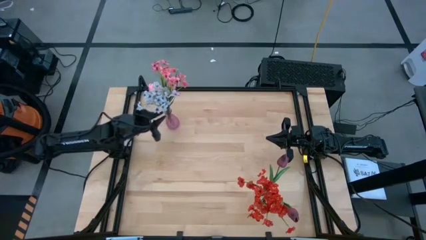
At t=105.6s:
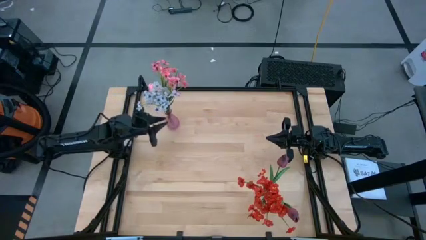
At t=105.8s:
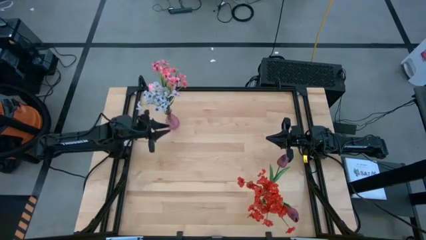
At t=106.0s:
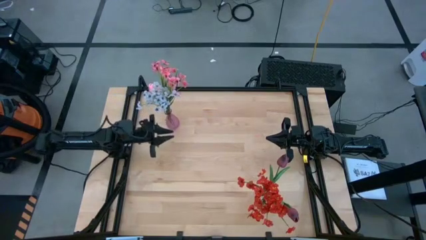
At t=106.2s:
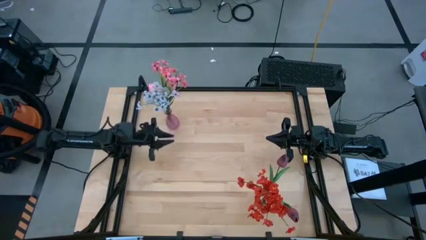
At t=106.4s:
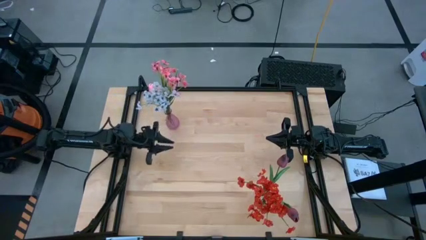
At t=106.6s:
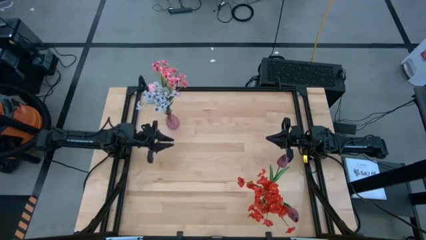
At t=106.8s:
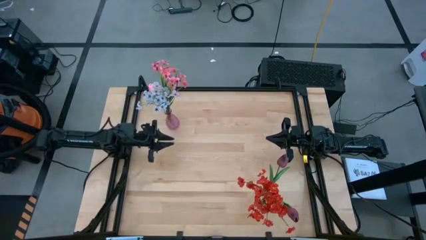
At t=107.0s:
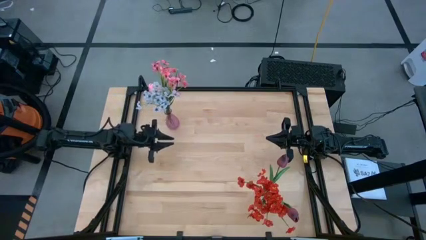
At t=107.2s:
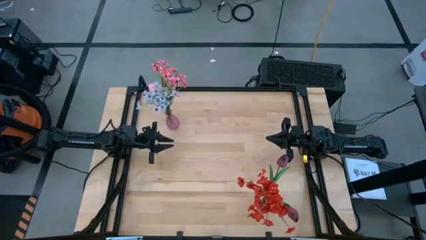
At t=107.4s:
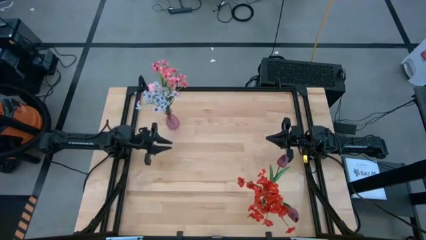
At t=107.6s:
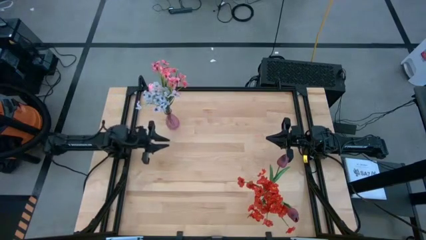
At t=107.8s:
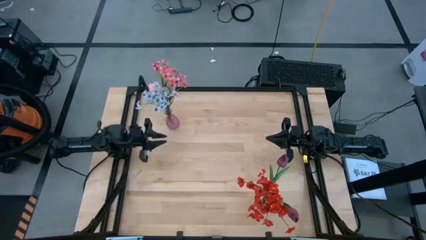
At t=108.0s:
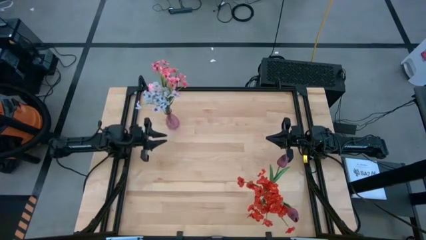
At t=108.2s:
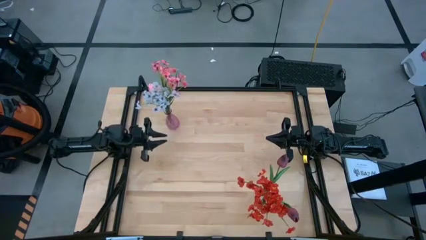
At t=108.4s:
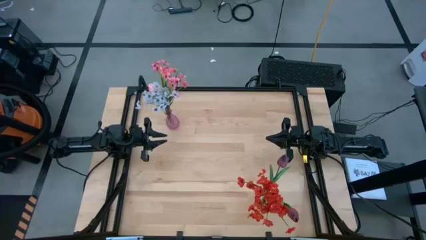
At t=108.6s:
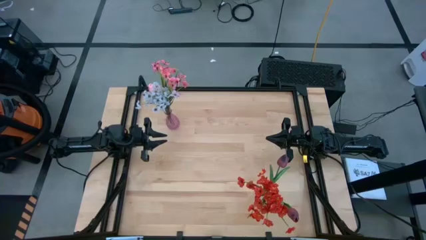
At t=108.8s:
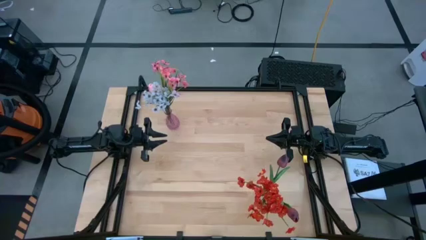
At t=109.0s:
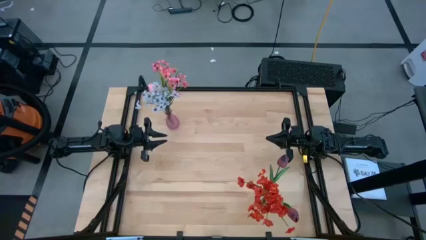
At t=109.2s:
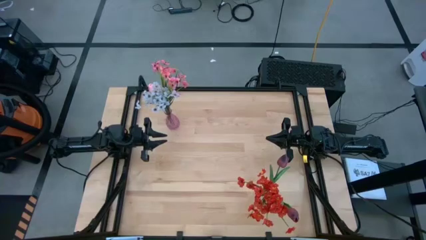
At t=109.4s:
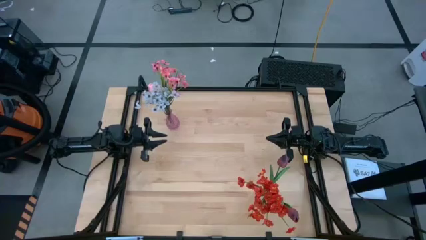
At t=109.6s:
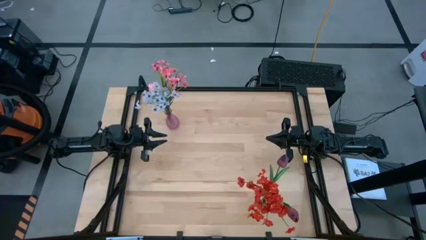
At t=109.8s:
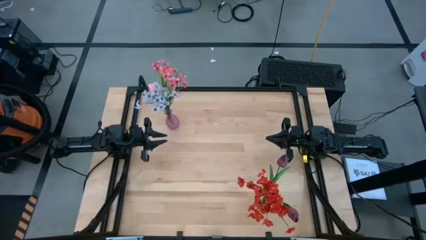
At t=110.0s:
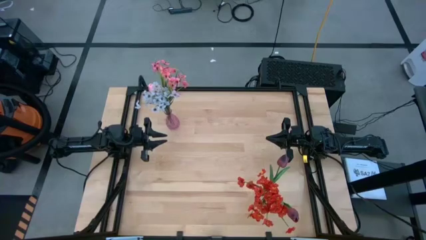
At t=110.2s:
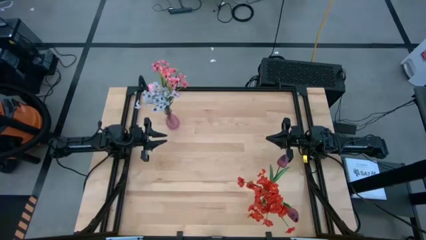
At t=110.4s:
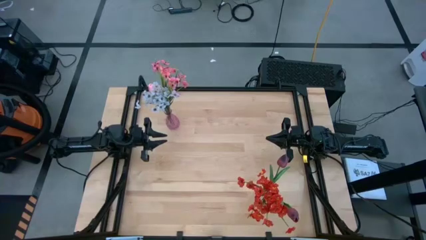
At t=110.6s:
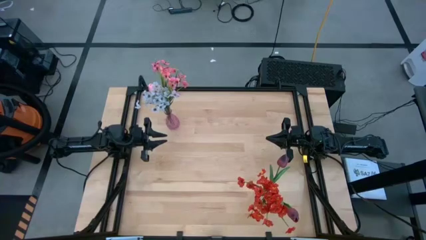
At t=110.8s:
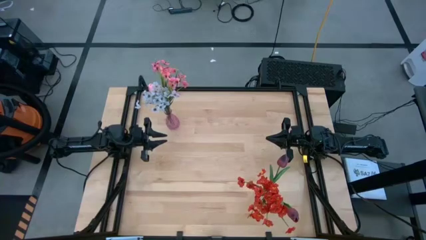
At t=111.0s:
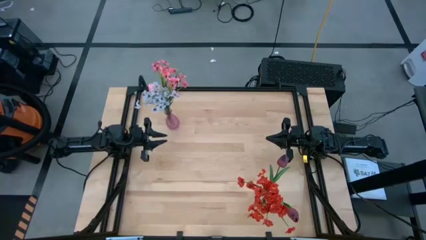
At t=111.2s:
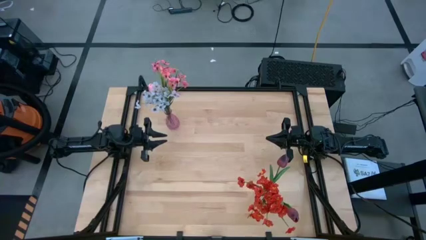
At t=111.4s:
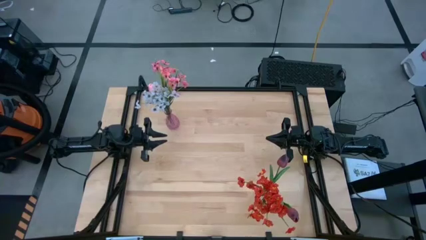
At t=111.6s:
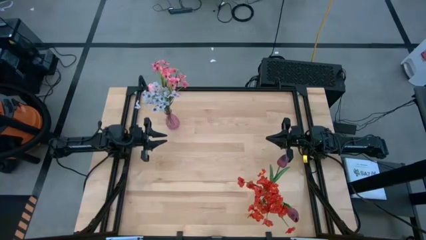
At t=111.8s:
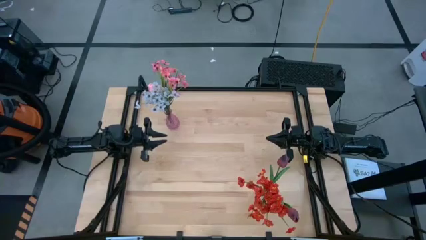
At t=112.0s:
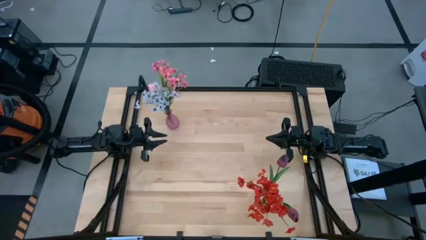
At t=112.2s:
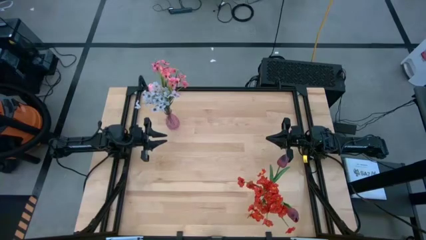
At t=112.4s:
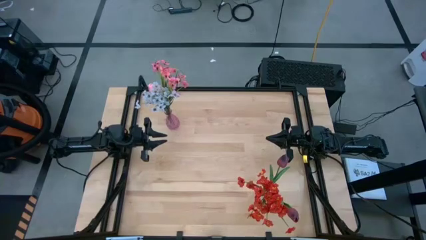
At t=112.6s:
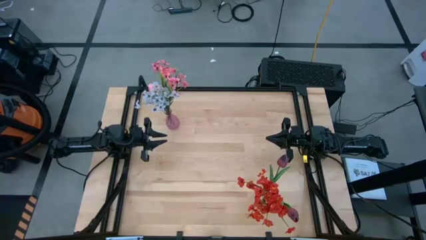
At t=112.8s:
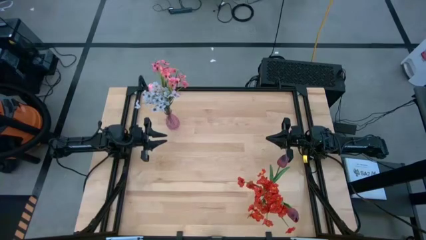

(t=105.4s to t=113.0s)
Task: Sort flowers into vase by color
Return to Home Position

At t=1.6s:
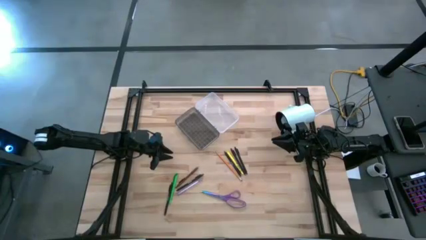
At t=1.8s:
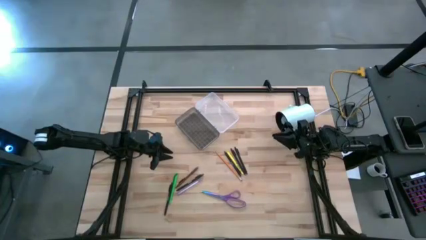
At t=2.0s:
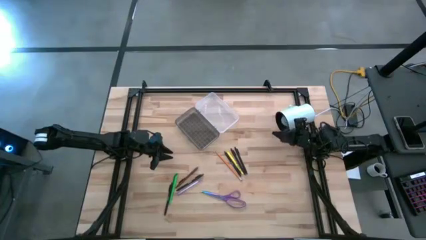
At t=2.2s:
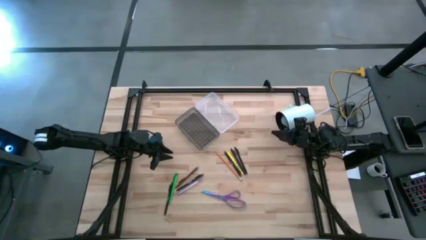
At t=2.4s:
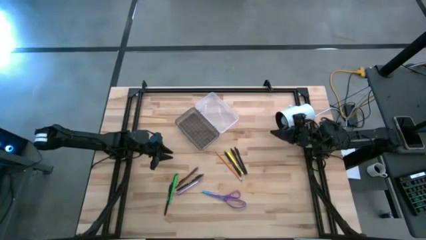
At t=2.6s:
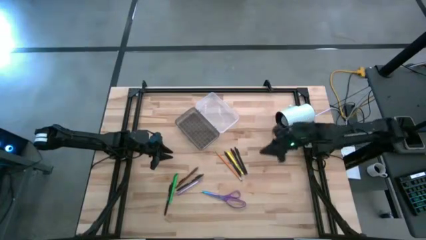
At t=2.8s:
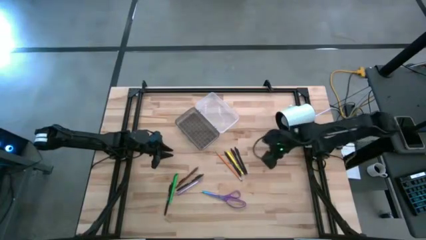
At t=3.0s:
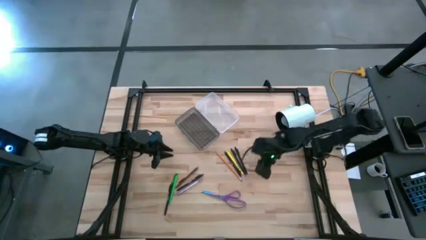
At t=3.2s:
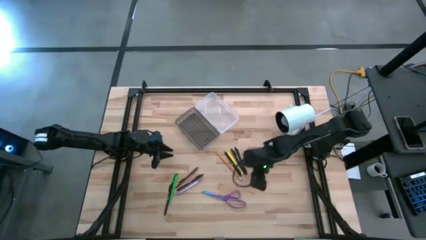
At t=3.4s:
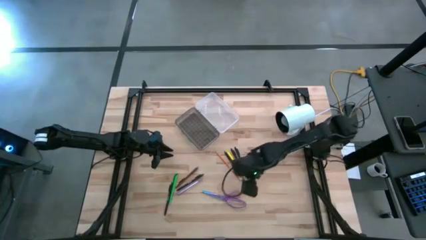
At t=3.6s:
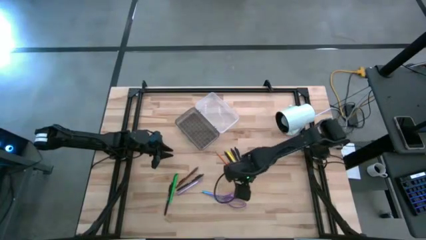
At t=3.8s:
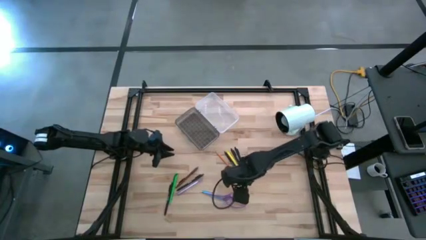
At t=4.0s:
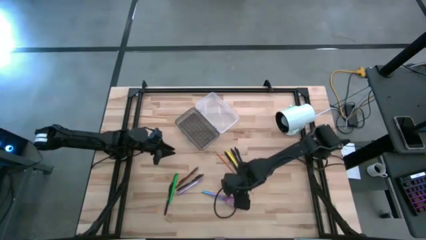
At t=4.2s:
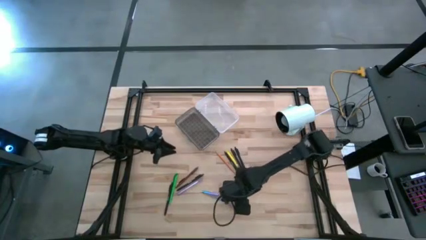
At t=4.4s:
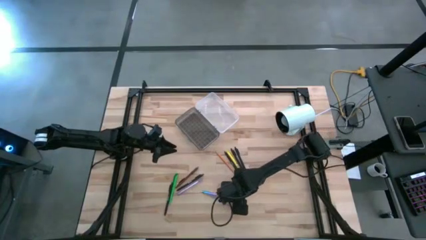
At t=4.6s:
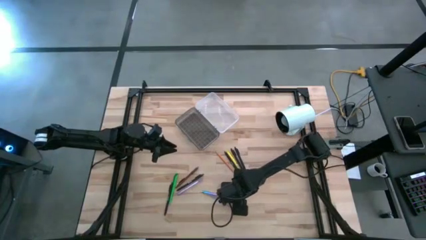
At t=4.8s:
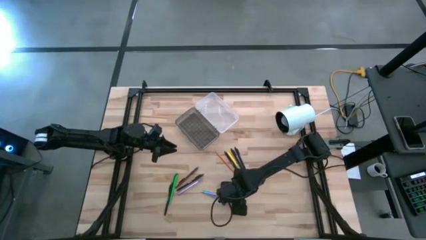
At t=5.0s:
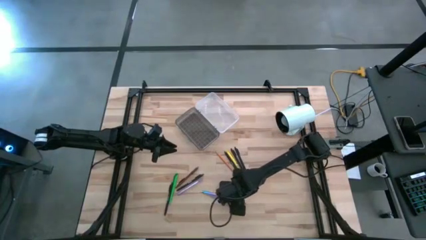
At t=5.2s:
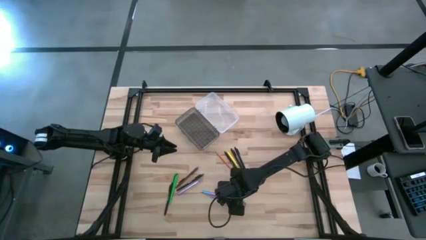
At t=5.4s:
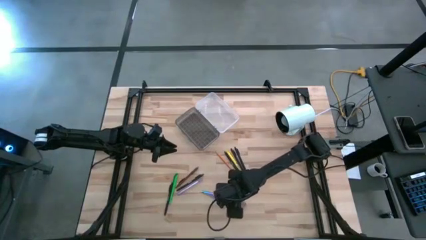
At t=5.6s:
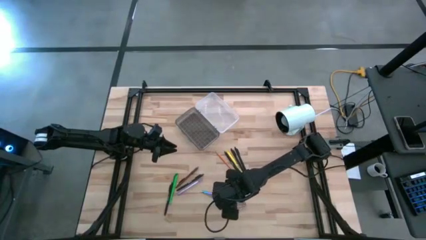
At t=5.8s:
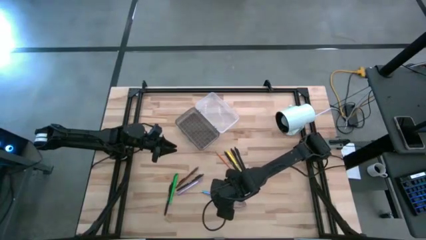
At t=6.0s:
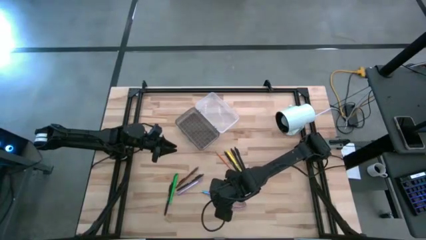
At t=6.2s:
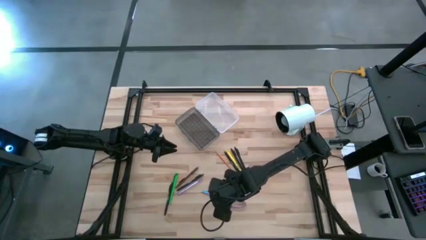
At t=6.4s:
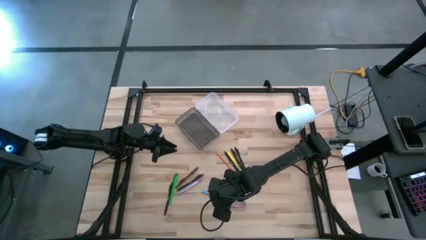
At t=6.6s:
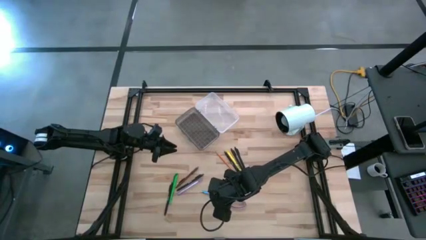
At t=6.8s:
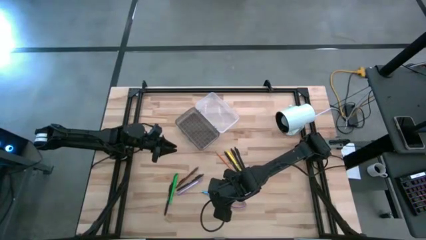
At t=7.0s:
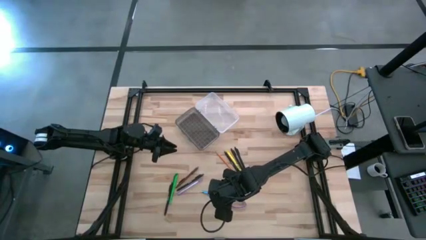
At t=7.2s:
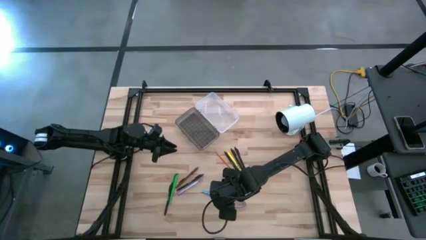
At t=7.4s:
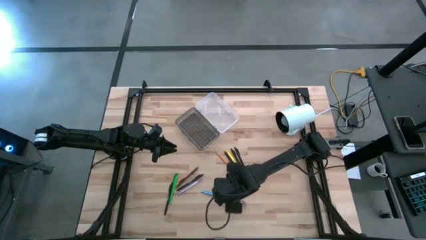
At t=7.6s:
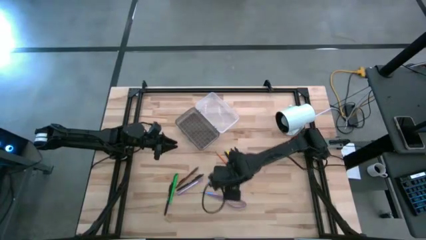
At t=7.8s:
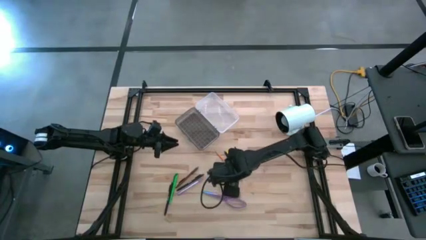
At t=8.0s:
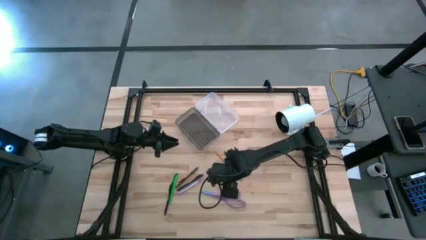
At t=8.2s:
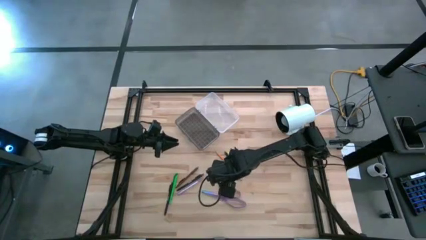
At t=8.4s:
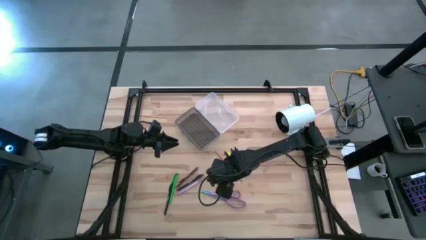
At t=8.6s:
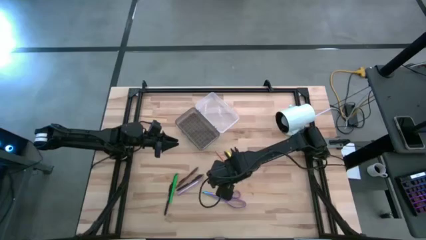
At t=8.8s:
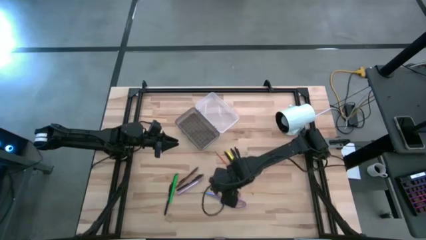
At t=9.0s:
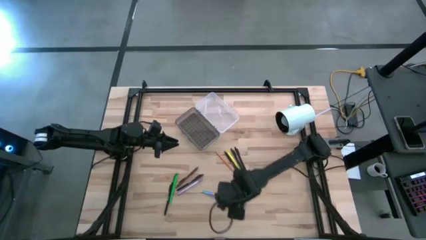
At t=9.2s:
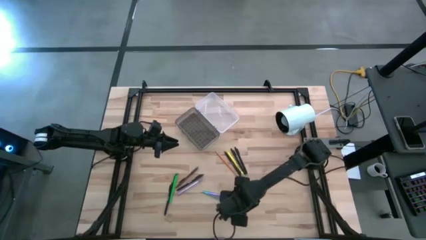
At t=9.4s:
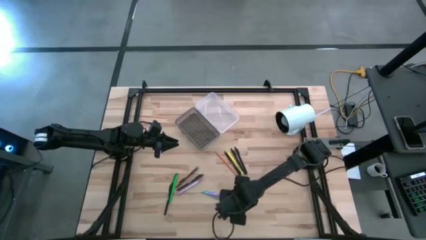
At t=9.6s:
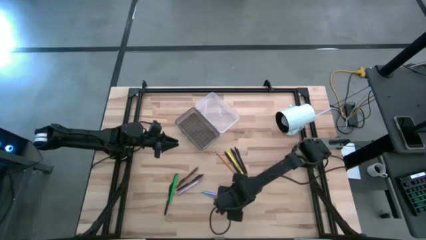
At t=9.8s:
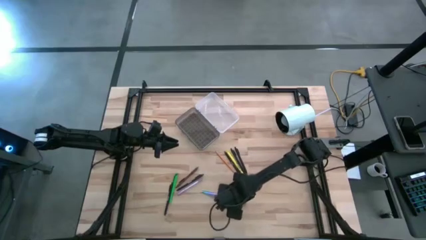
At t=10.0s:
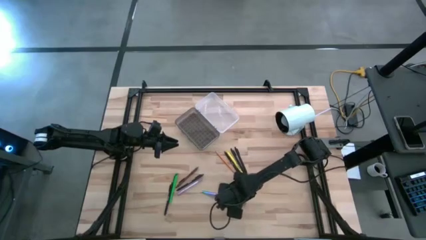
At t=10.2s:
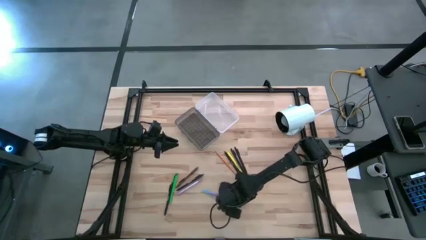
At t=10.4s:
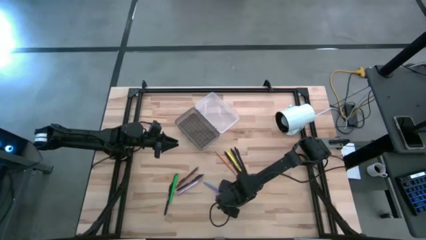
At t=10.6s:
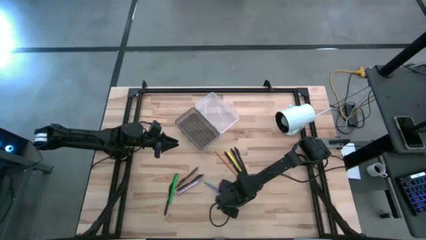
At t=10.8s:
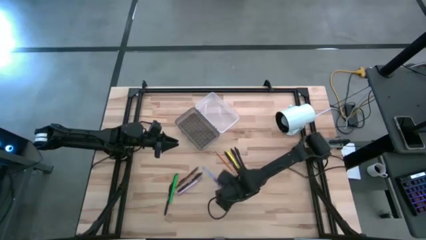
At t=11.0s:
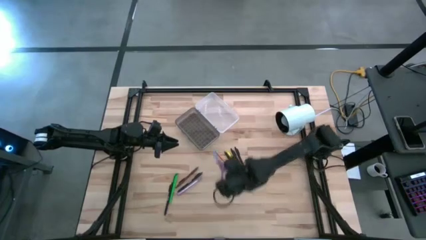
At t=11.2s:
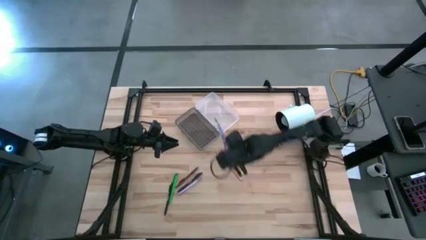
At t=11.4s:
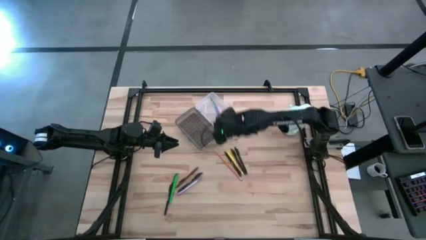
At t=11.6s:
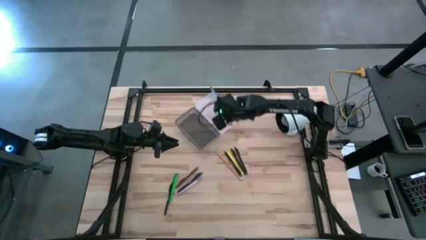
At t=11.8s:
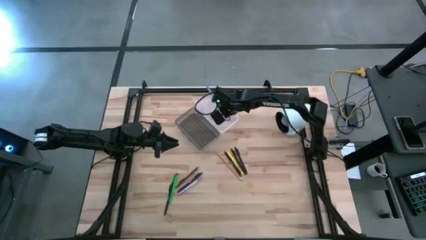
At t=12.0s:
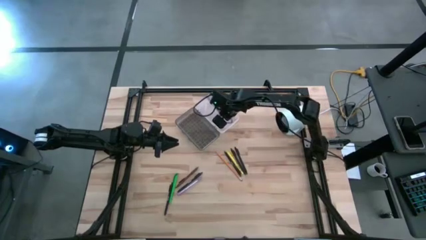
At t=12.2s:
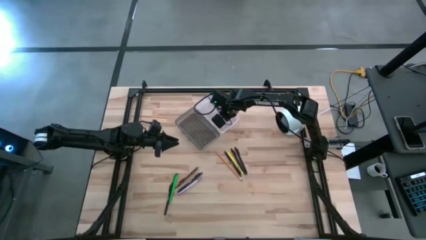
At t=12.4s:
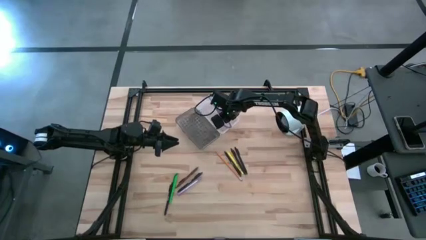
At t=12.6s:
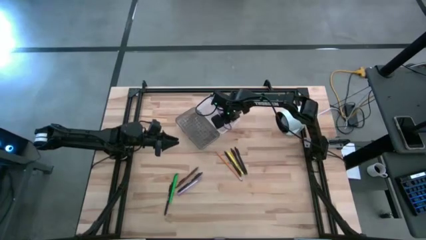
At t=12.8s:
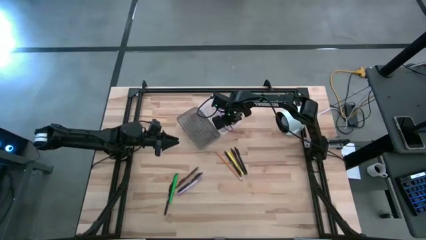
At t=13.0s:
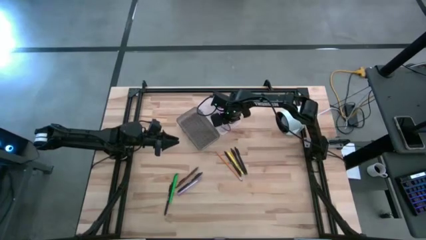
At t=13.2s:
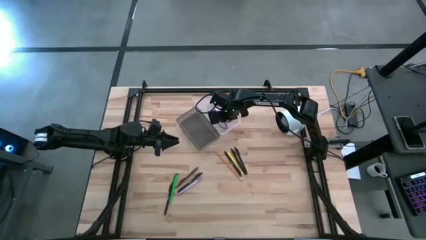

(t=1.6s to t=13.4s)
Task: Pick & place school supplies into a supply box
Put the violet scissors into the black supply box
